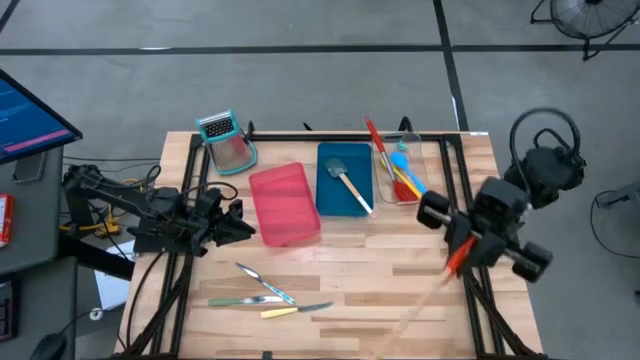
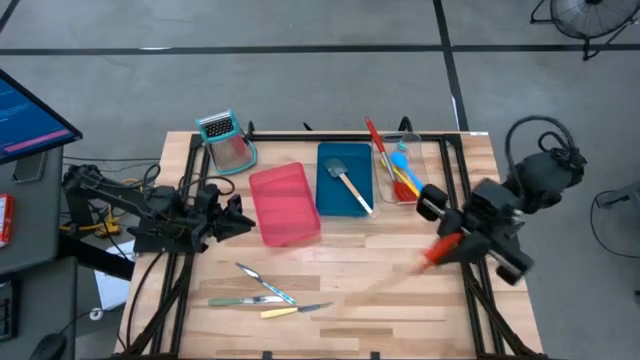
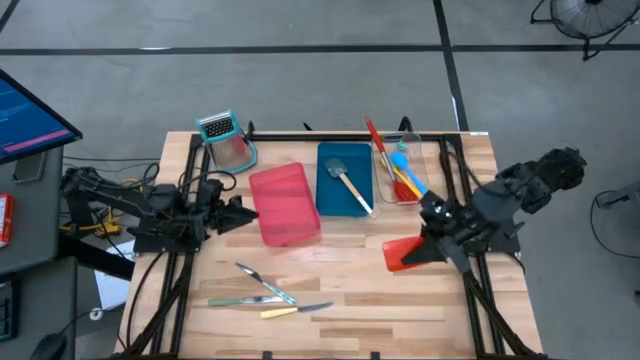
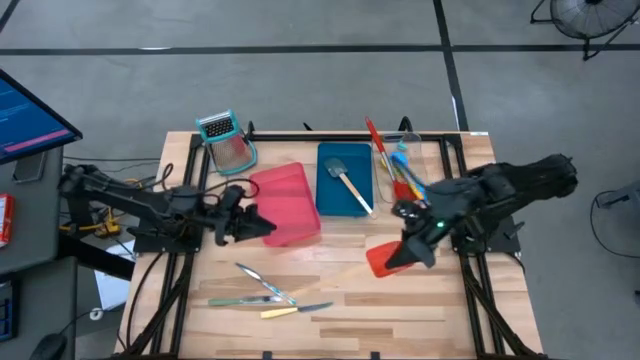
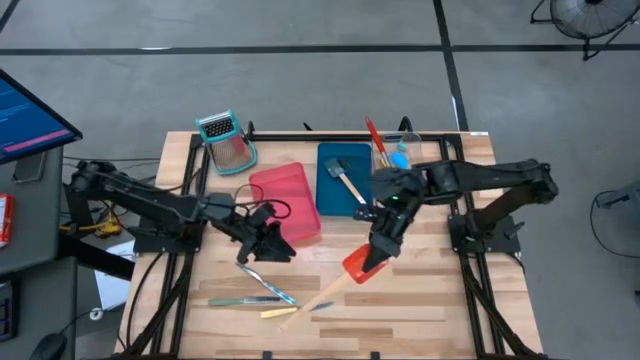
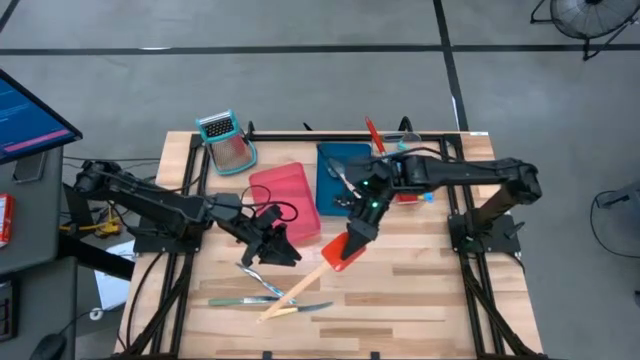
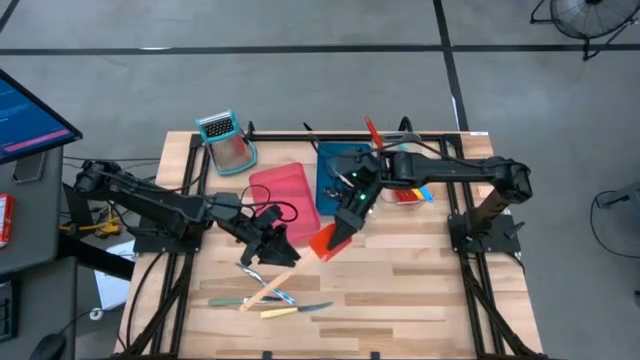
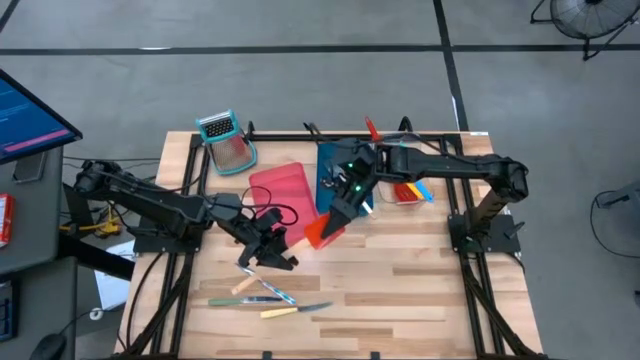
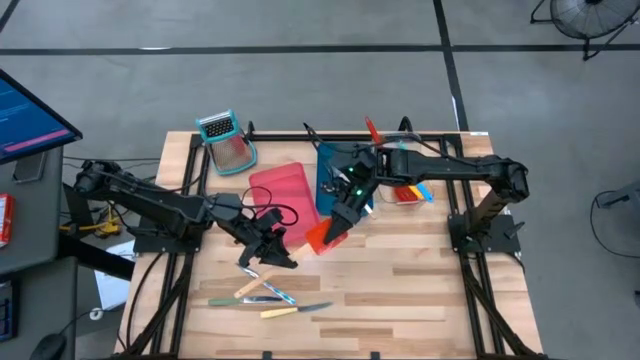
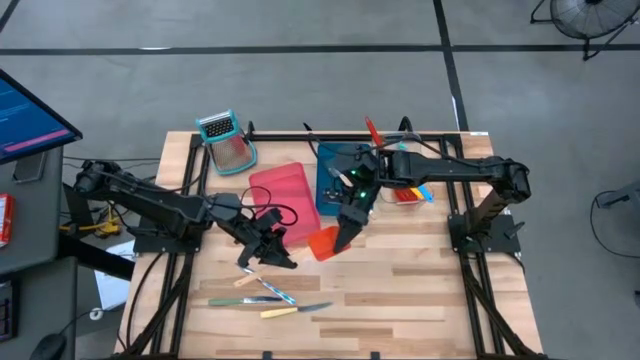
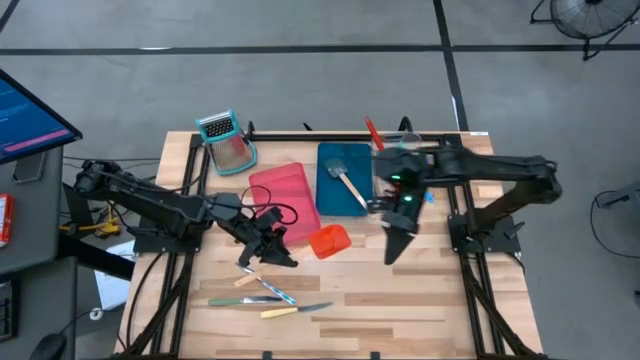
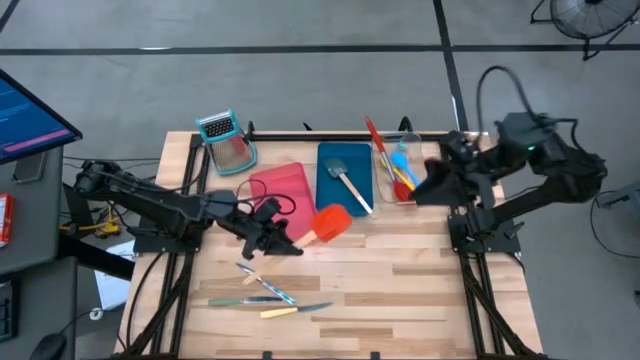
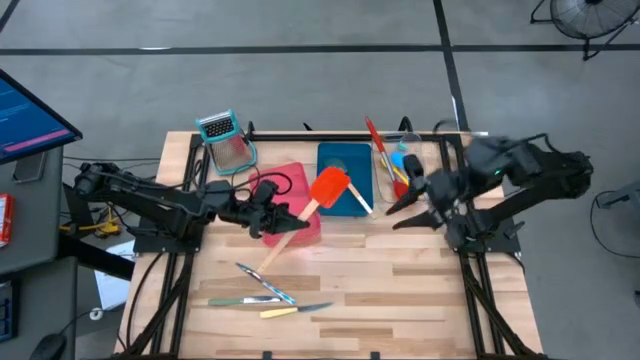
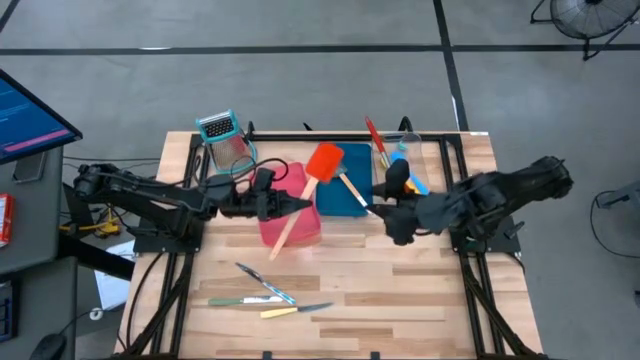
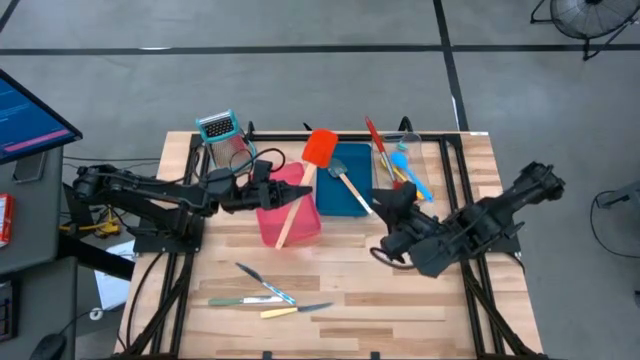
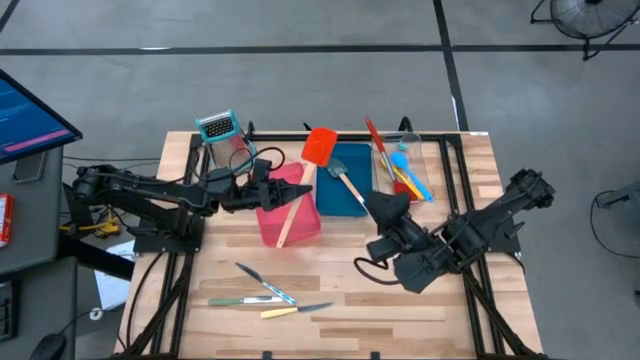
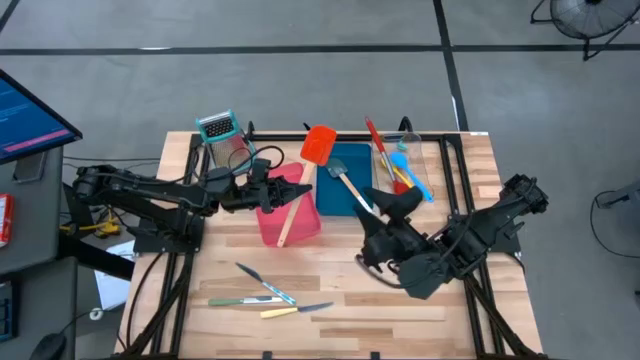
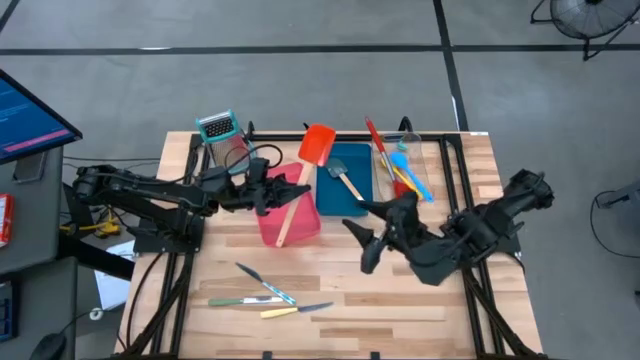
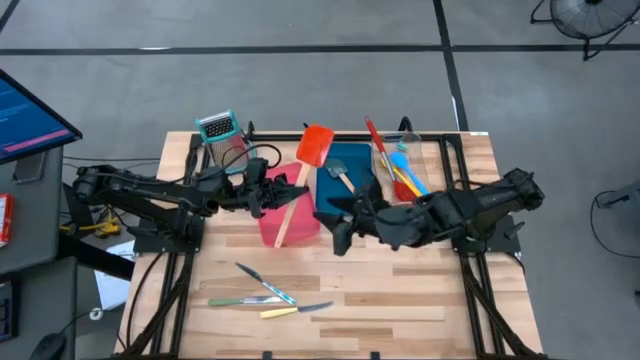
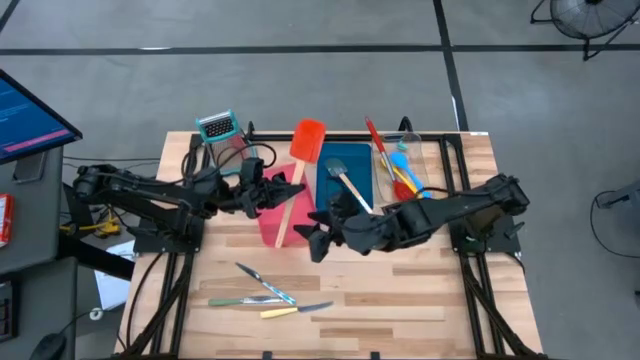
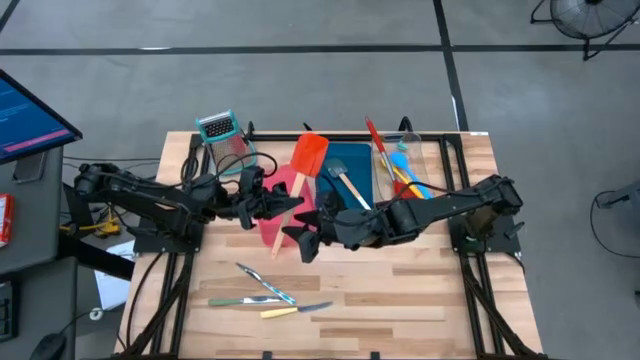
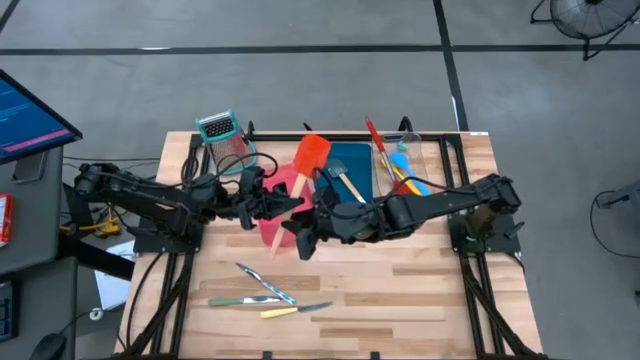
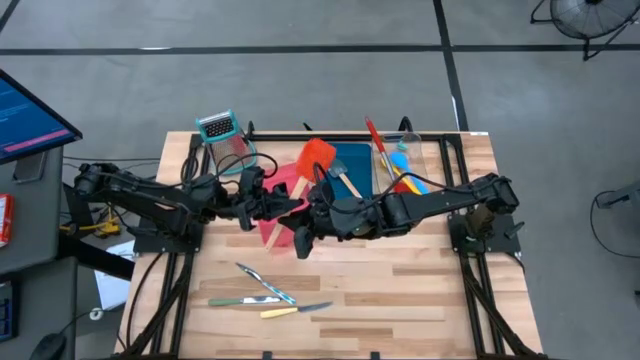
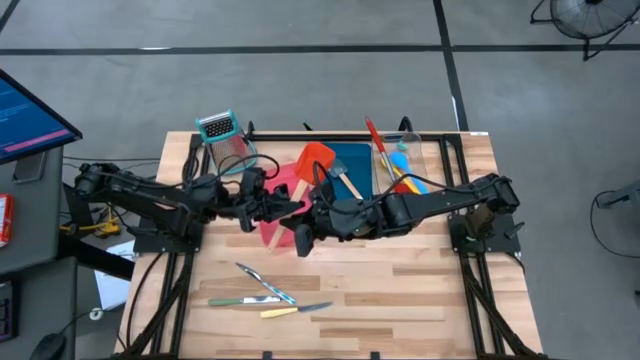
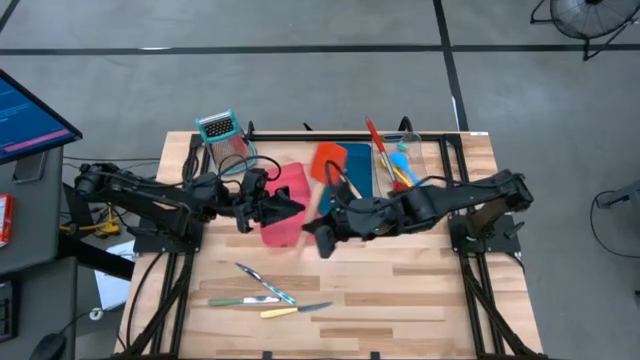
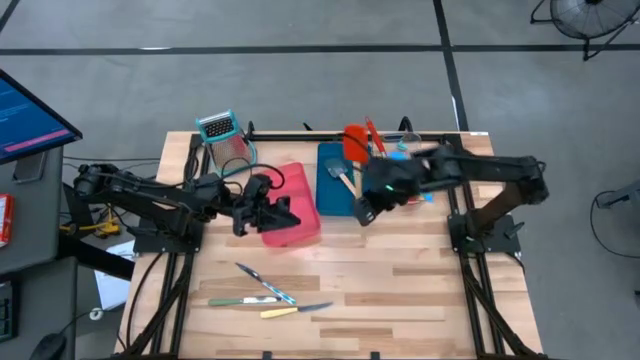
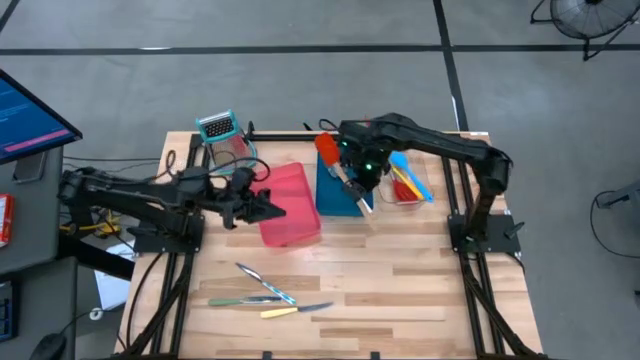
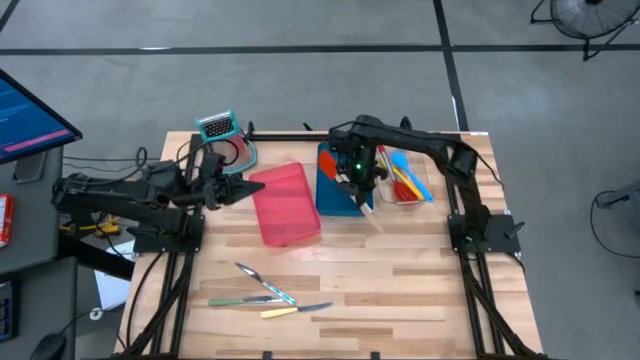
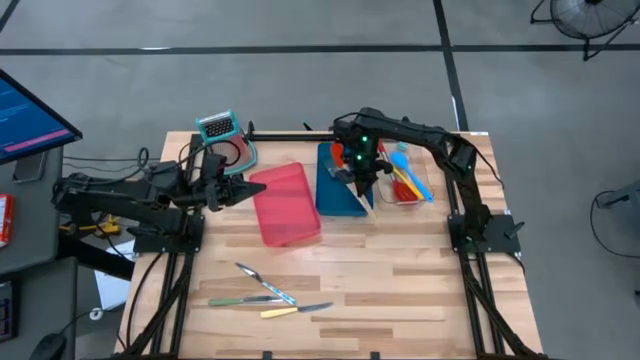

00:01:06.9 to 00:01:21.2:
Task: Pick & Place Kitchen Items
Put the red spatula into the blue bin

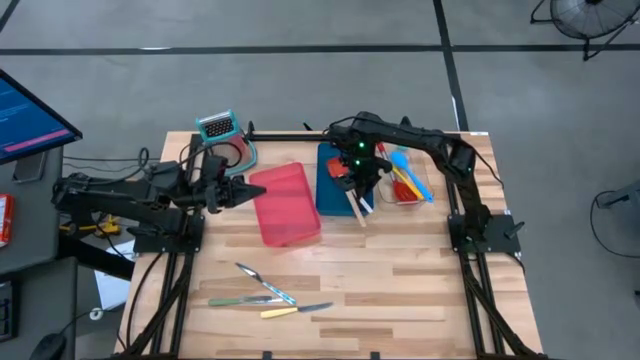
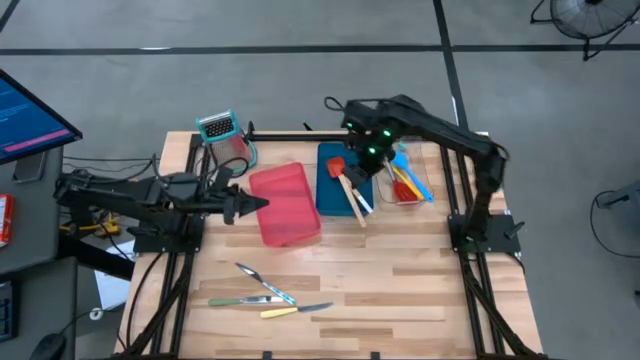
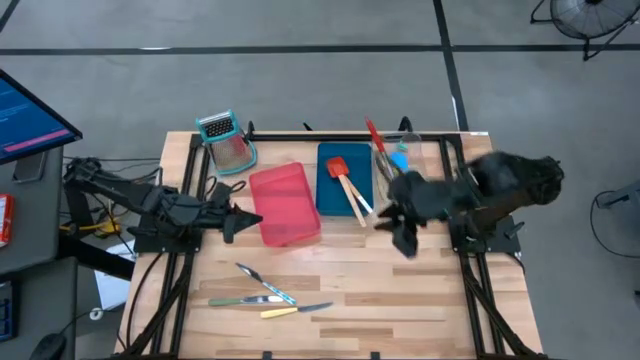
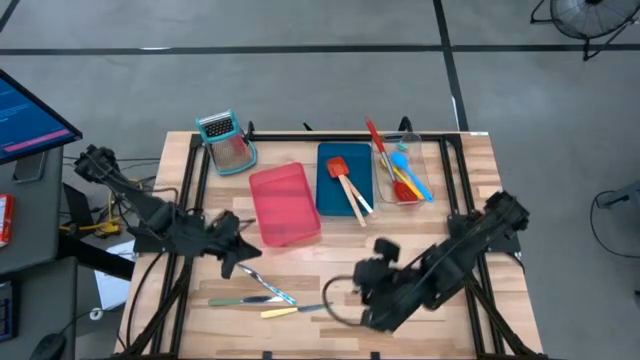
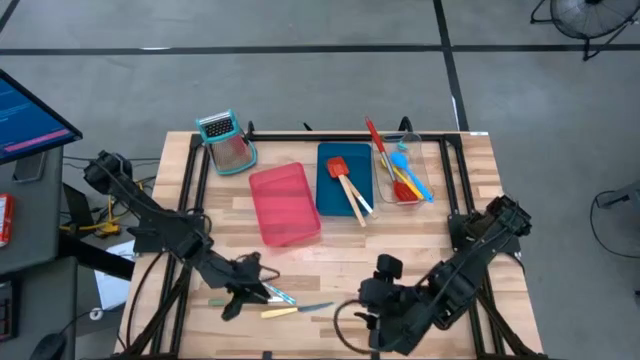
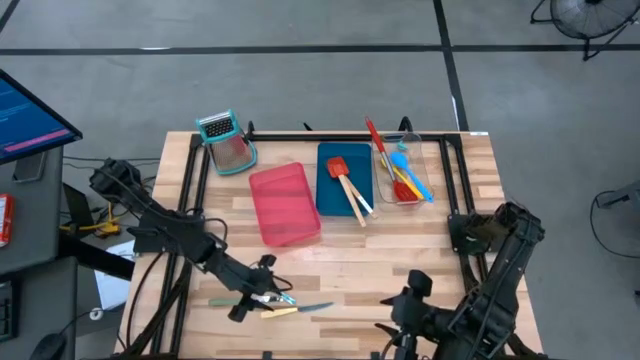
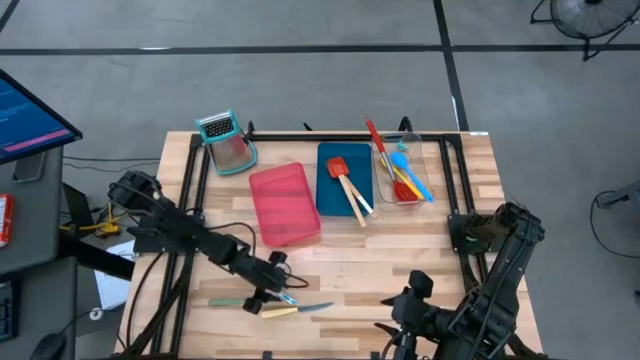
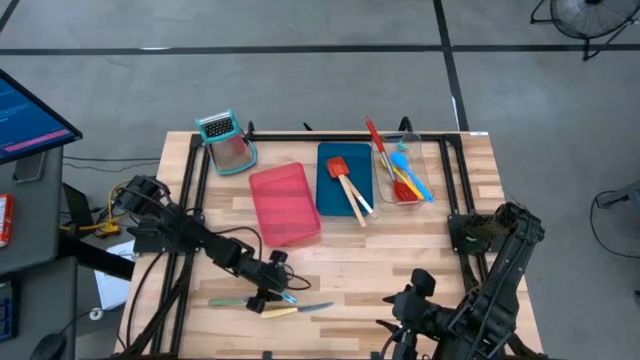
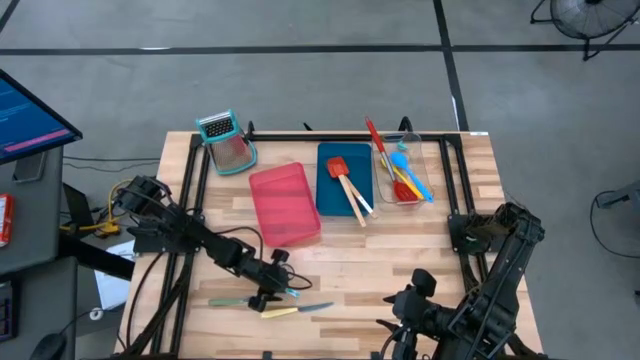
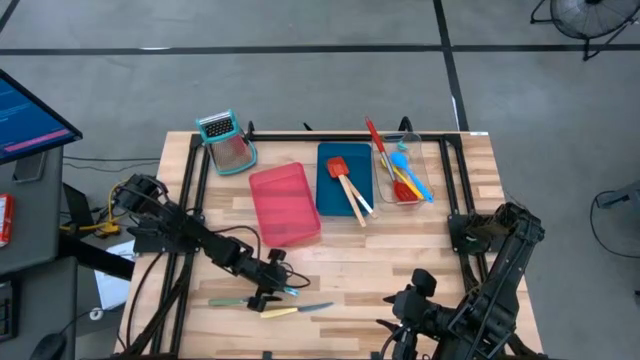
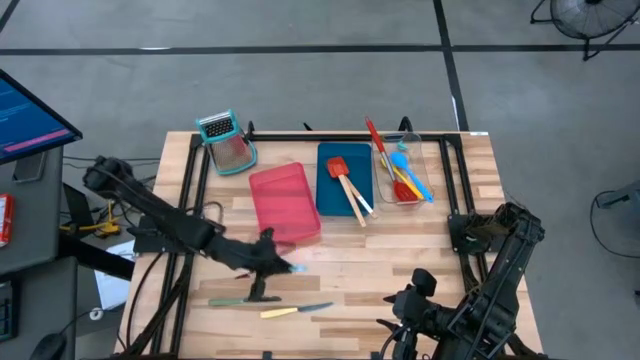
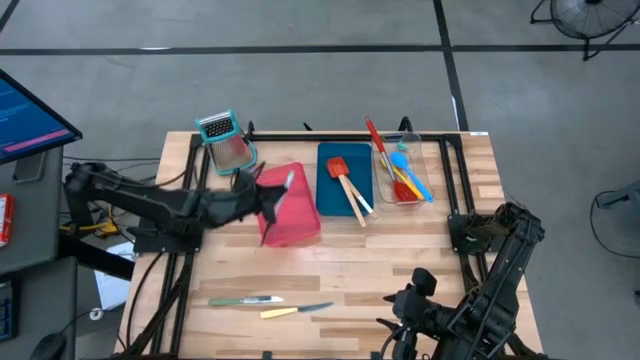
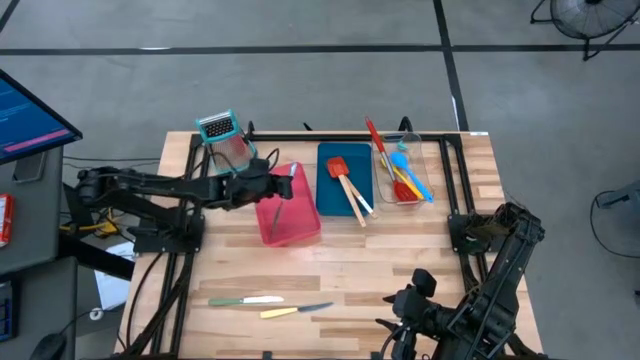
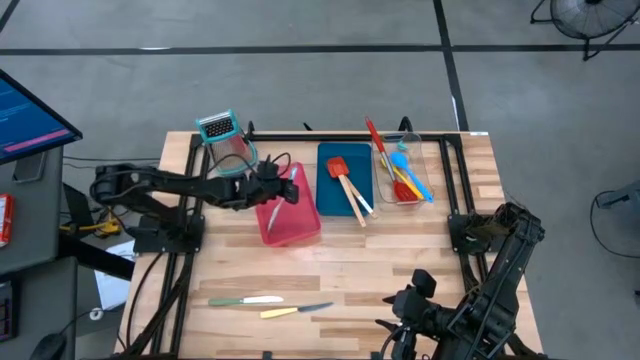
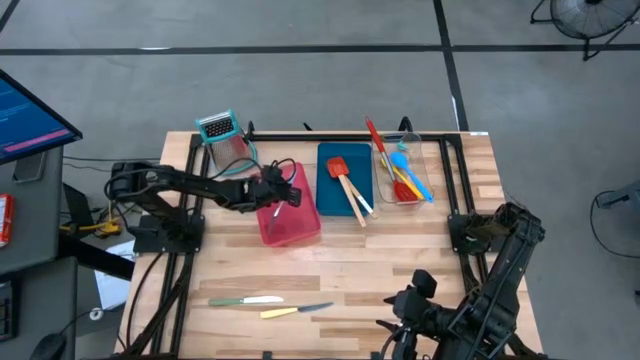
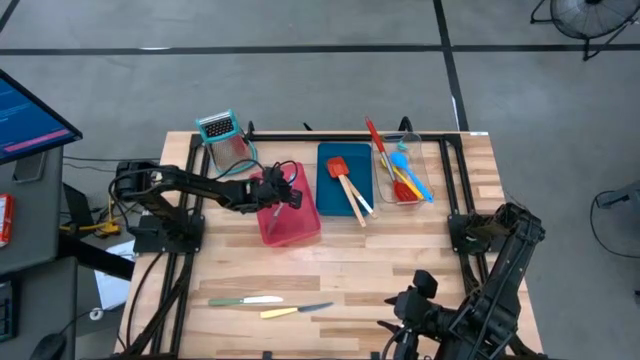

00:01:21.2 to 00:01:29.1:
Put the blue table knife into the red bin
